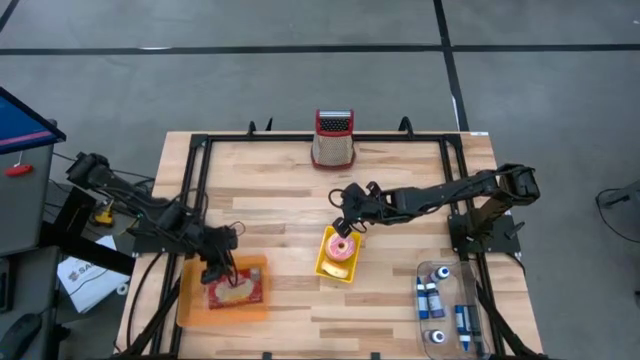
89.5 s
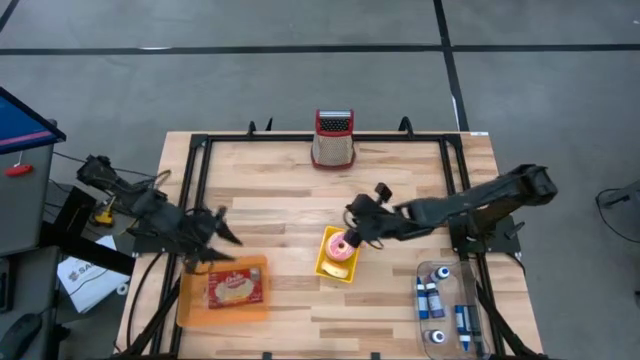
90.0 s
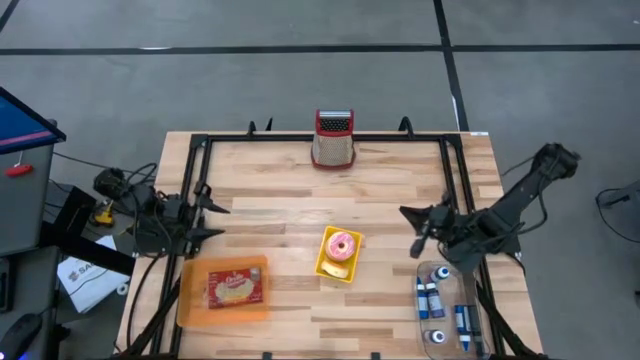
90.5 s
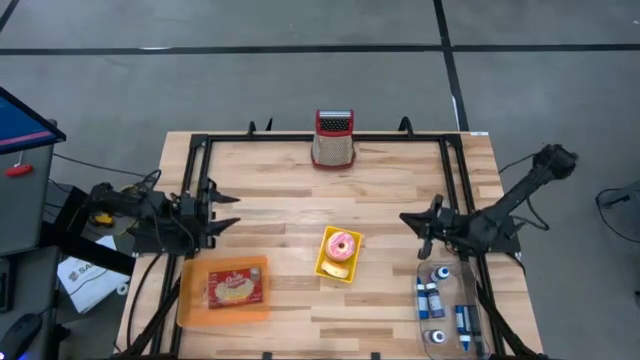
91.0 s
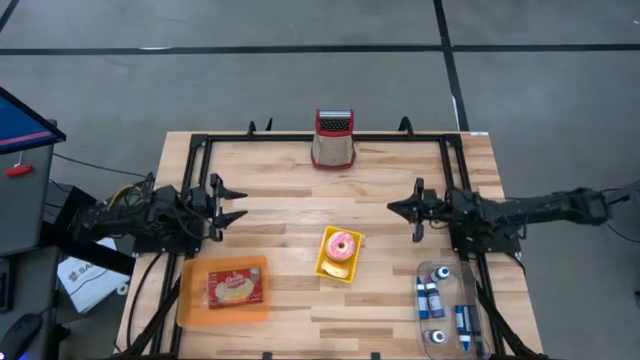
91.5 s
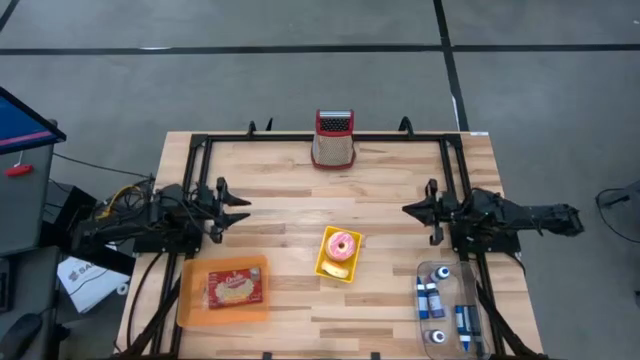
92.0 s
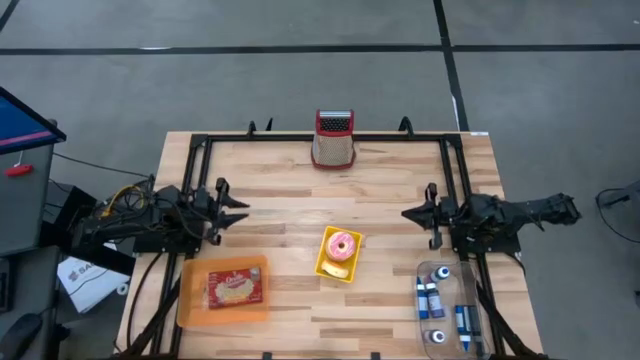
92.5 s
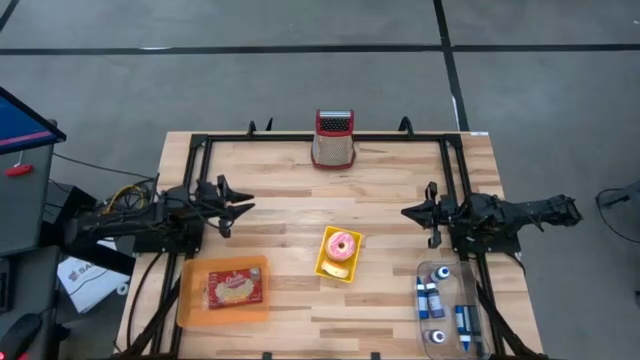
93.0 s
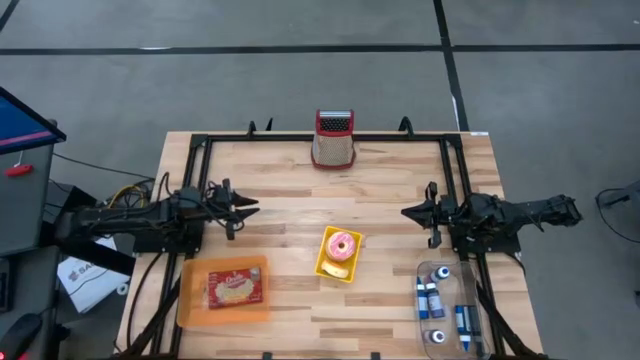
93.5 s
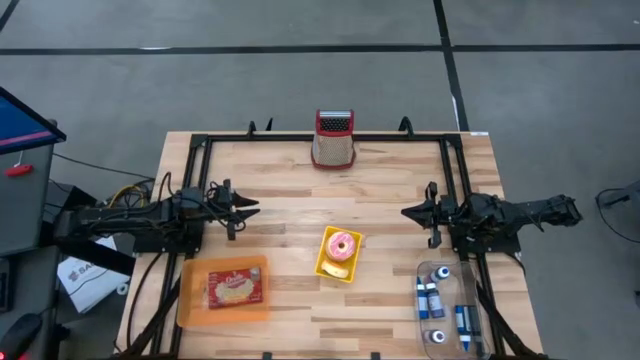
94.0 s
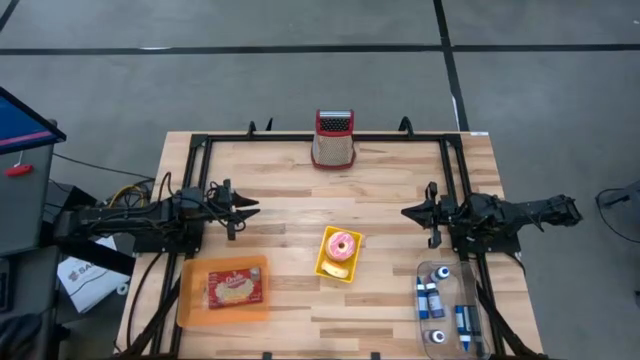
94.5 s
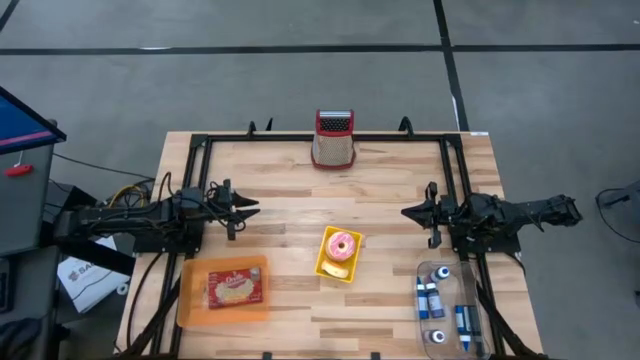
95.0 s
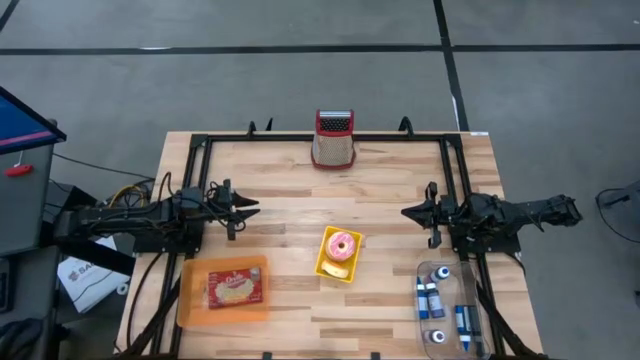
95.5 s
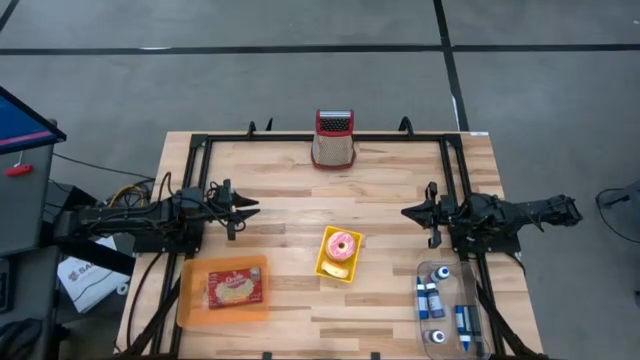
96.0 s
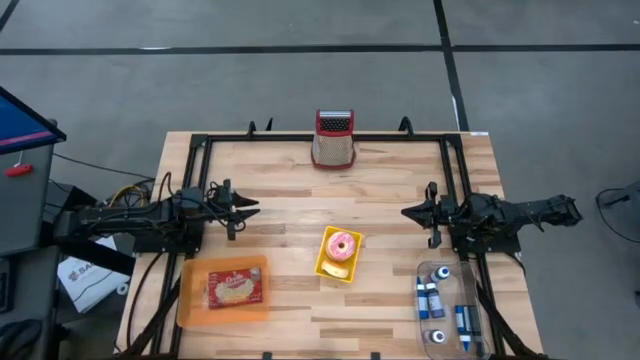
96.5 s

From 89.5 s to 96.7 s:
Return to Home Position

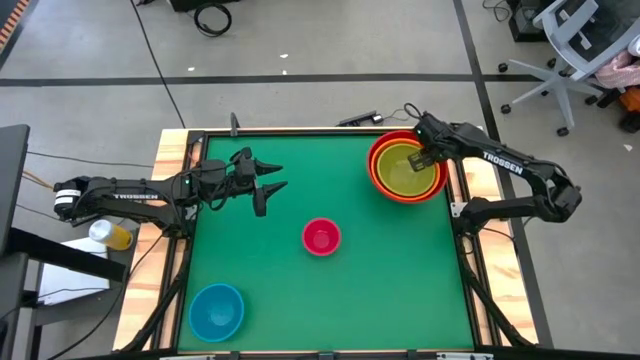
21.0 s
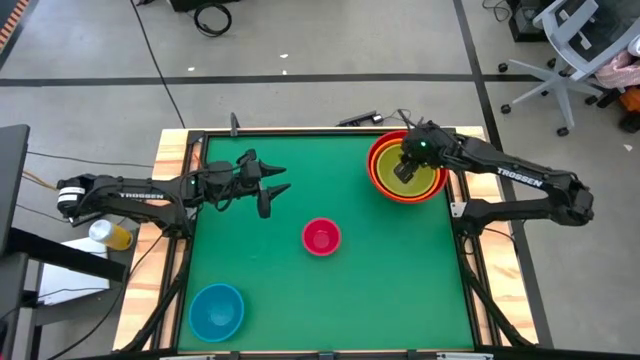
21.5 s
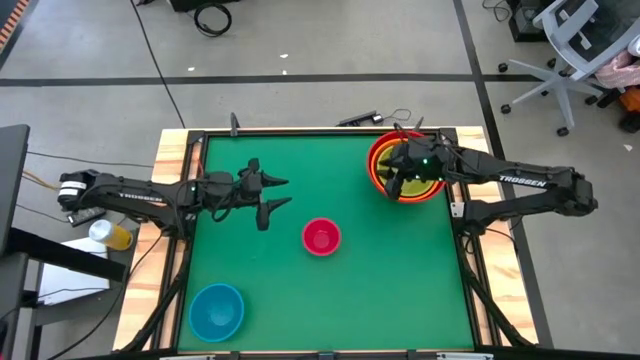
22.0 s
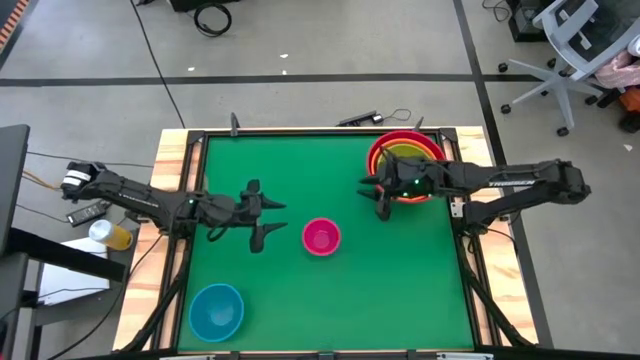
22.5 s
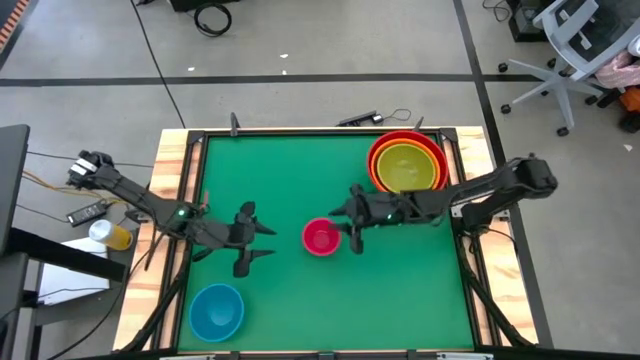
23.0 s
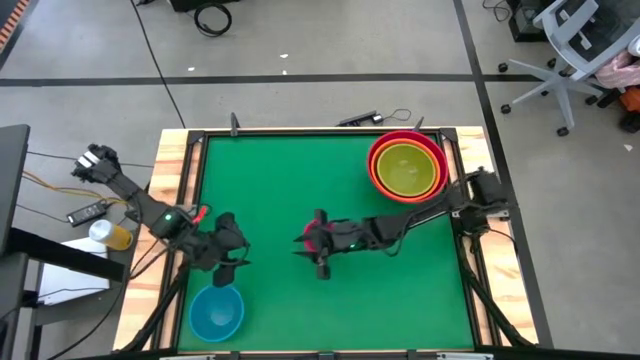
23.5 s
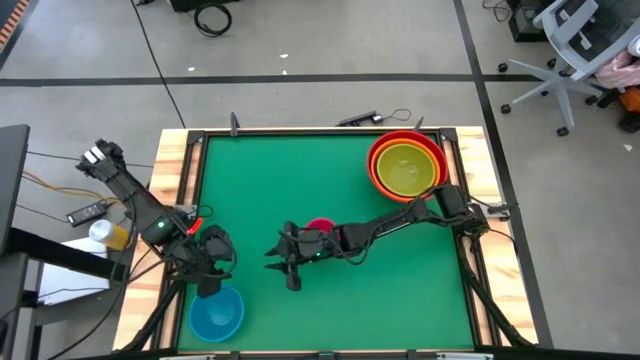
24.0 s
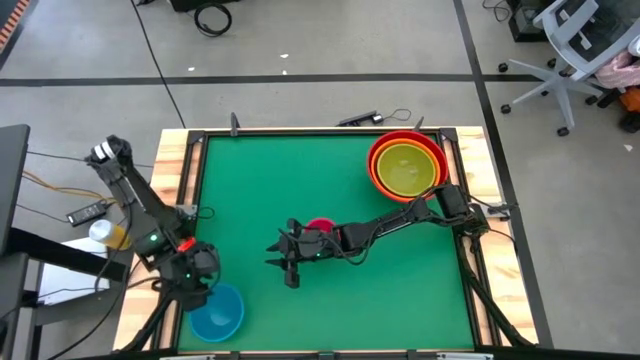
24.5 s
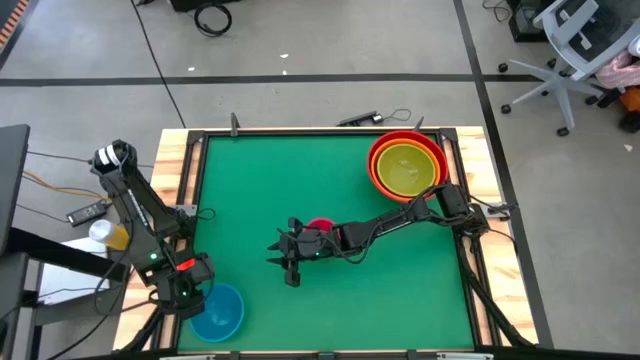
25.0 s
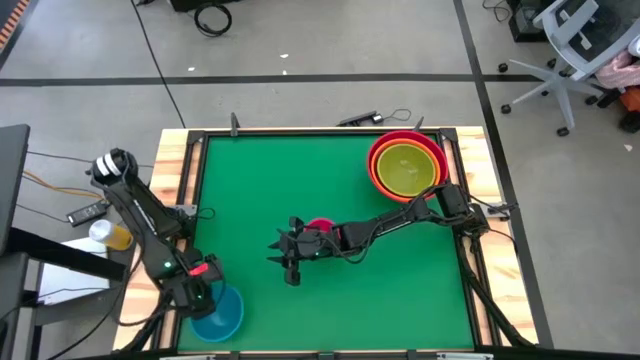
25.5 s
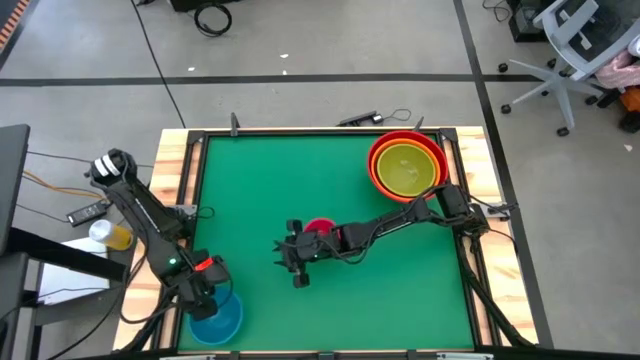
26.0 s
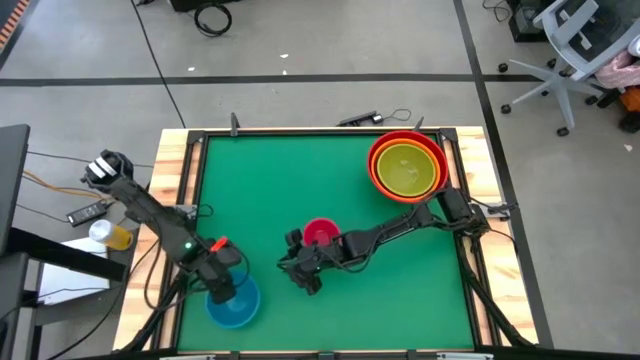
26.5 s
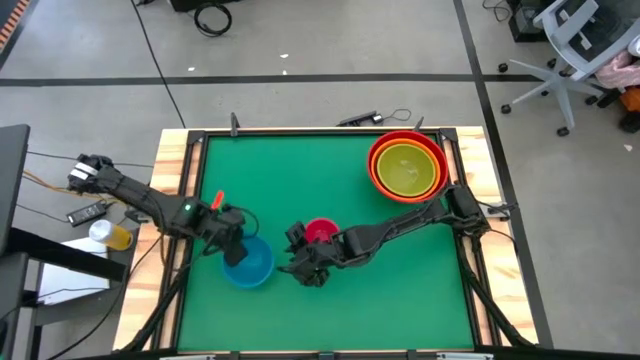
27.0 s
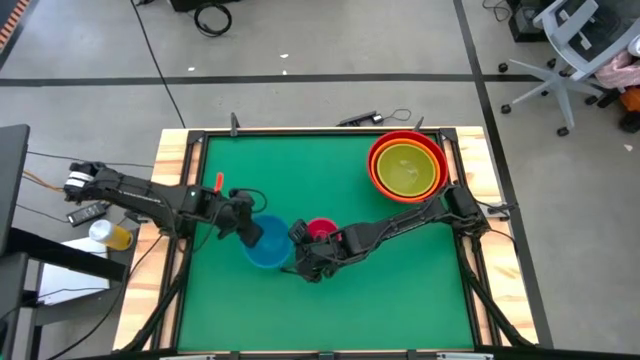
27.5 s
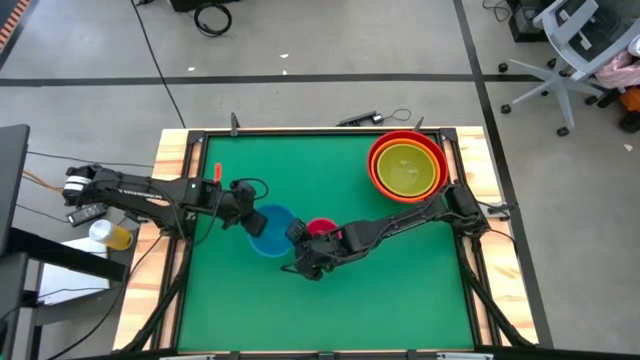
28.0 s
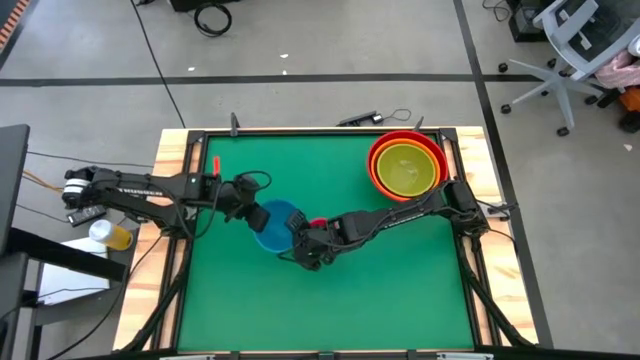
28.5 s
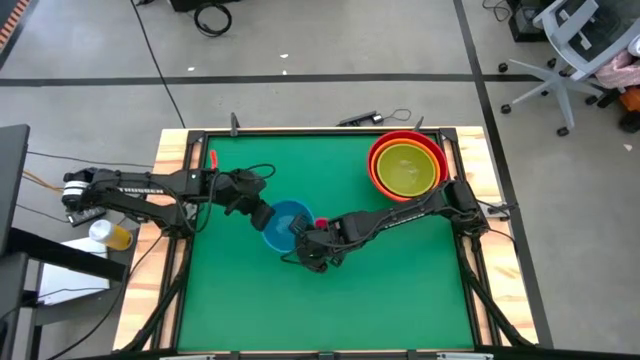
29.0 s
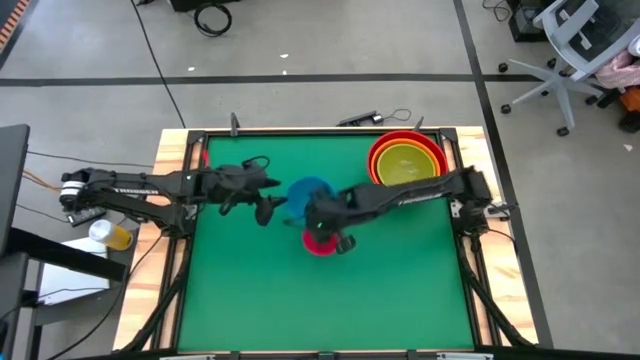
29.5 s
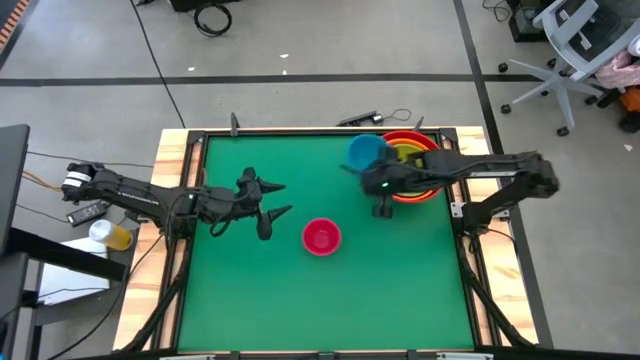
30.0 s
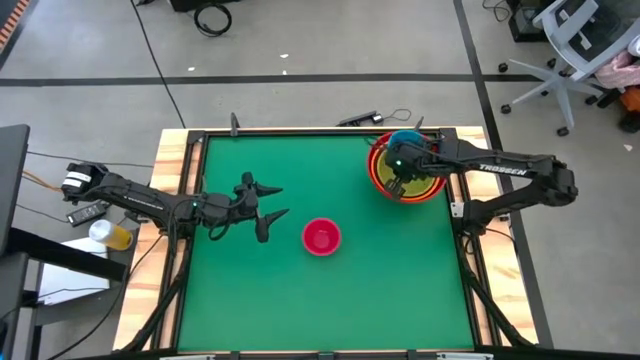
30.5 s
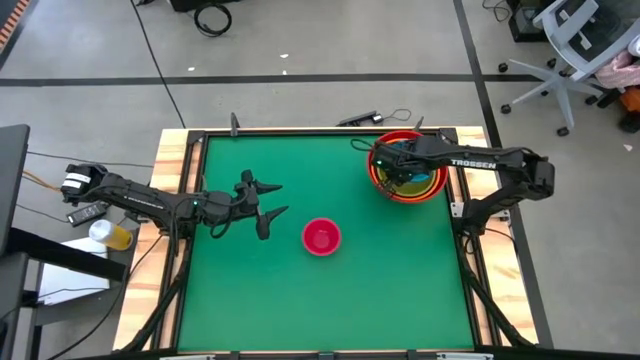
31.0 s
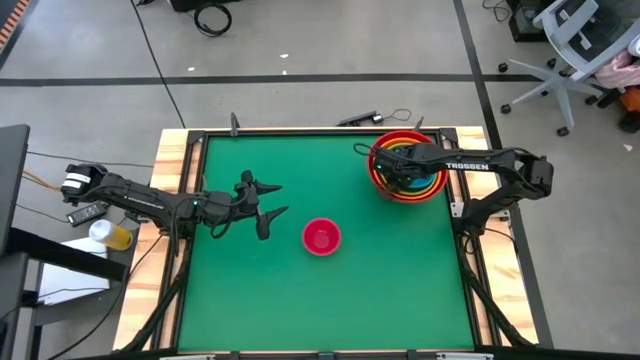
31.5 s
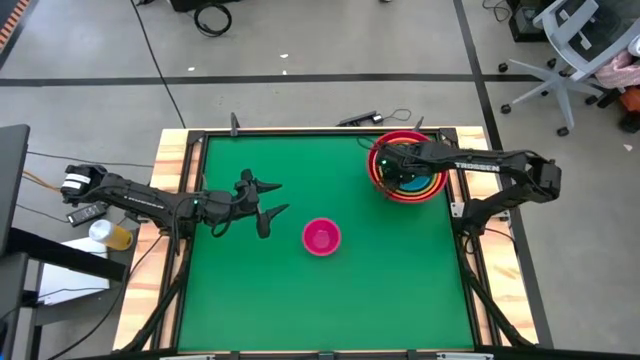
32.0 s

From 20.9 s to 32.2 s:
Stack the blue bowl on top of the green bowl
